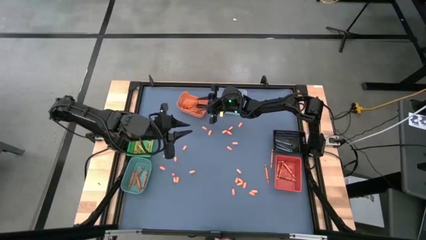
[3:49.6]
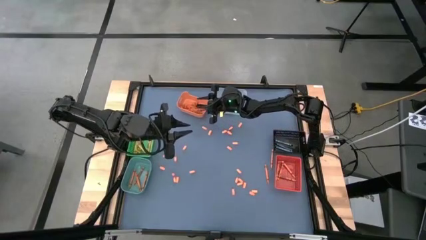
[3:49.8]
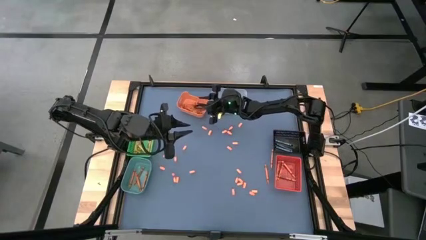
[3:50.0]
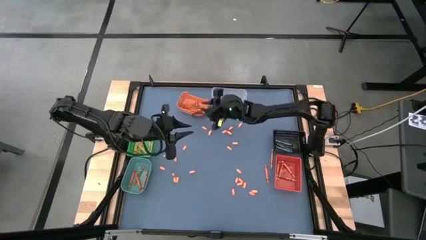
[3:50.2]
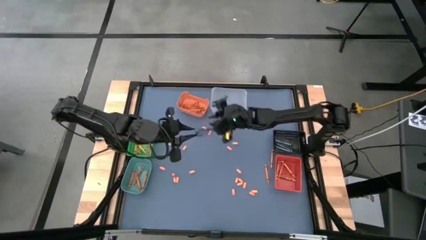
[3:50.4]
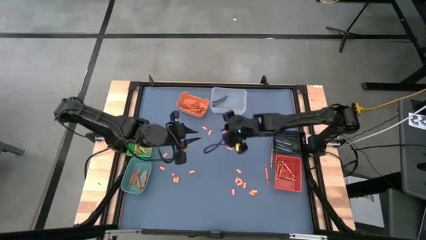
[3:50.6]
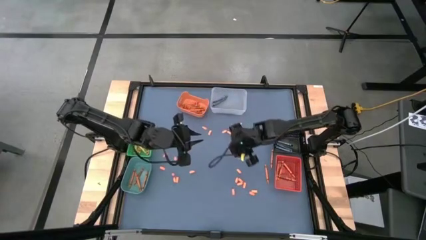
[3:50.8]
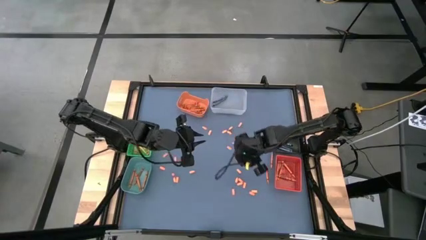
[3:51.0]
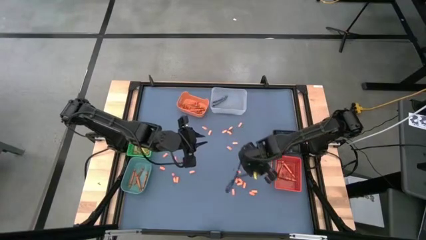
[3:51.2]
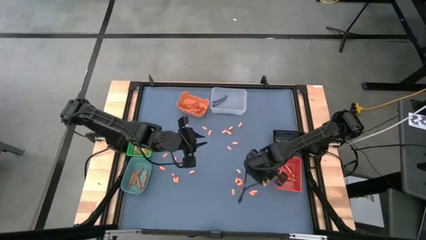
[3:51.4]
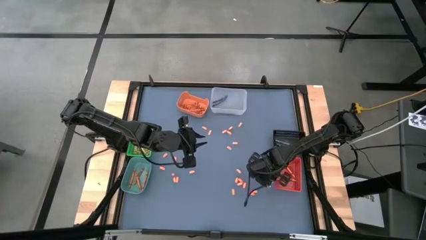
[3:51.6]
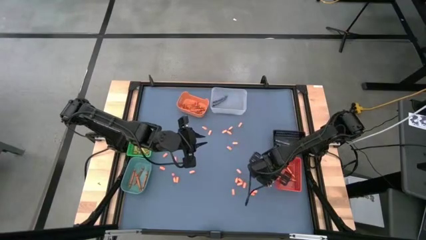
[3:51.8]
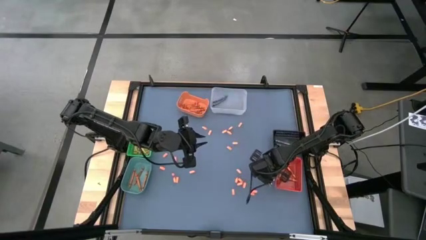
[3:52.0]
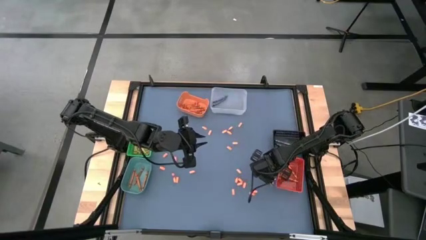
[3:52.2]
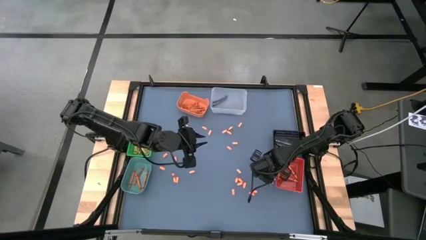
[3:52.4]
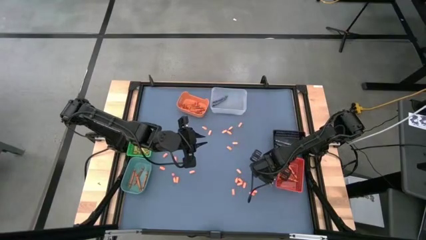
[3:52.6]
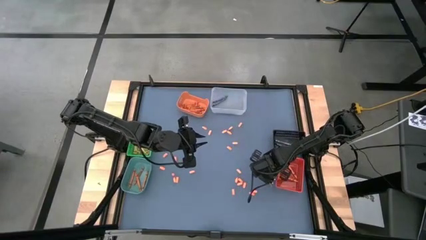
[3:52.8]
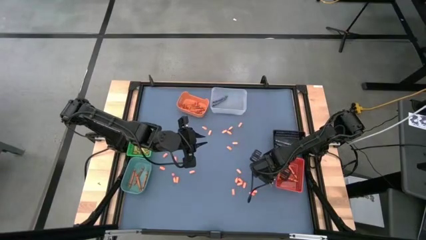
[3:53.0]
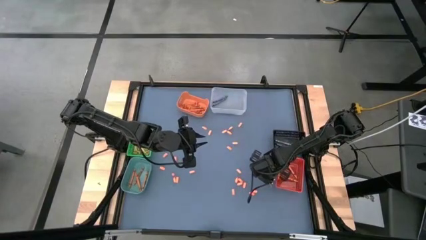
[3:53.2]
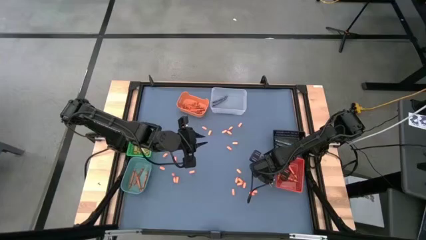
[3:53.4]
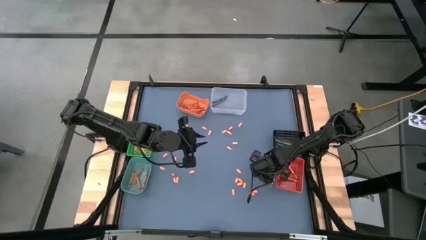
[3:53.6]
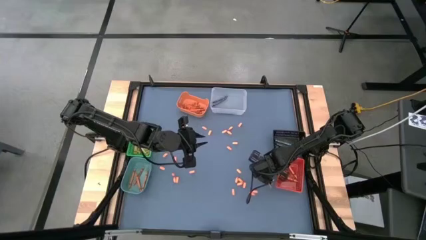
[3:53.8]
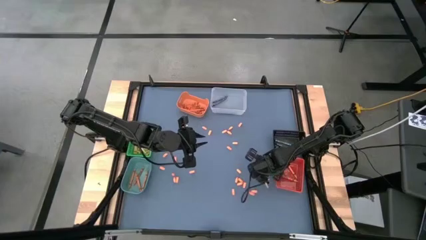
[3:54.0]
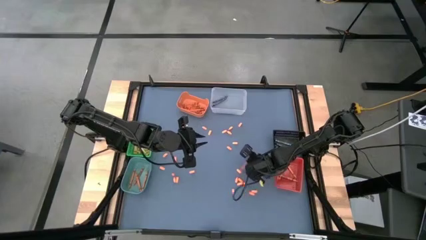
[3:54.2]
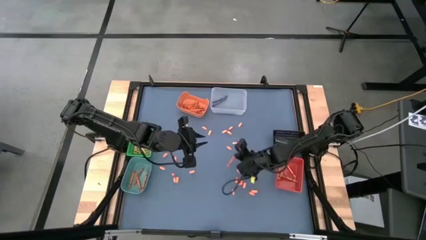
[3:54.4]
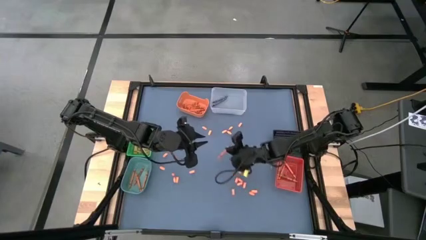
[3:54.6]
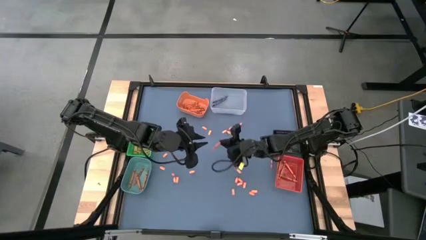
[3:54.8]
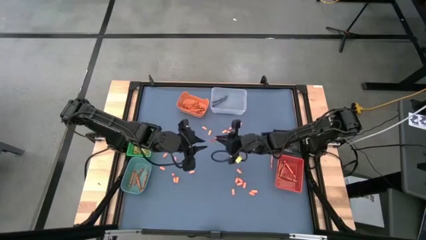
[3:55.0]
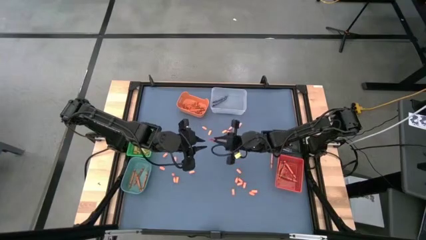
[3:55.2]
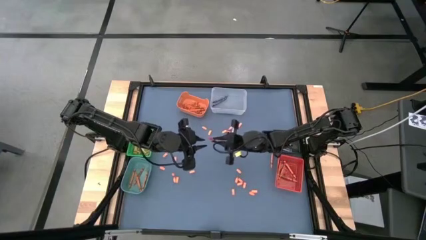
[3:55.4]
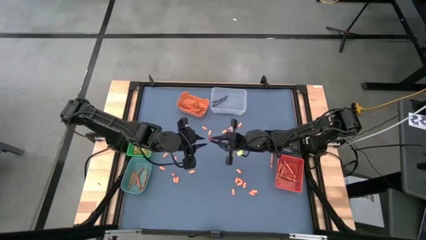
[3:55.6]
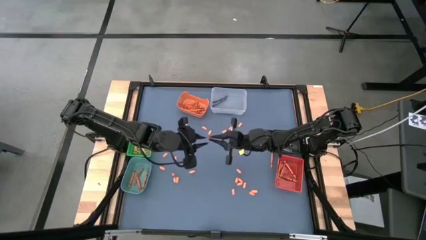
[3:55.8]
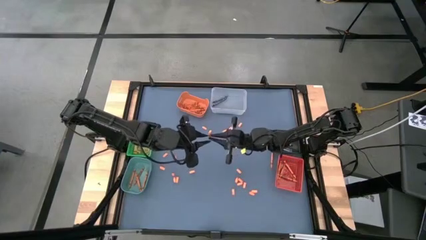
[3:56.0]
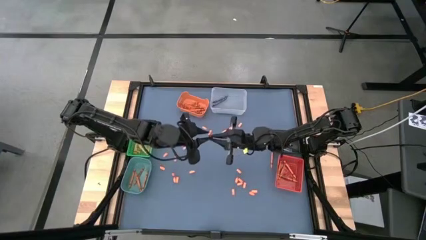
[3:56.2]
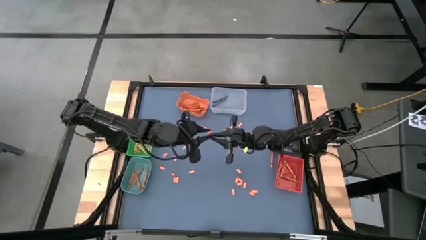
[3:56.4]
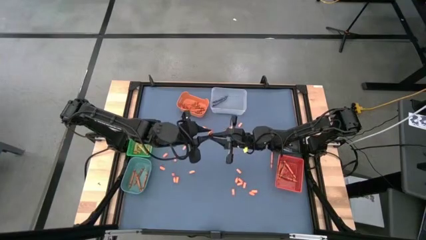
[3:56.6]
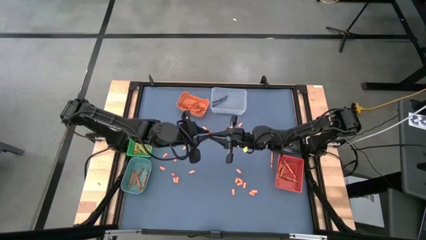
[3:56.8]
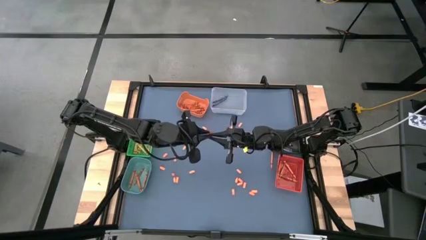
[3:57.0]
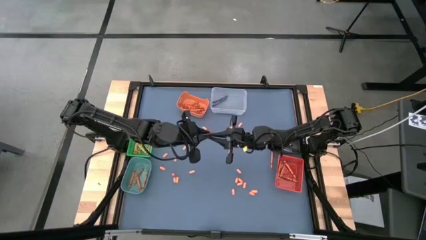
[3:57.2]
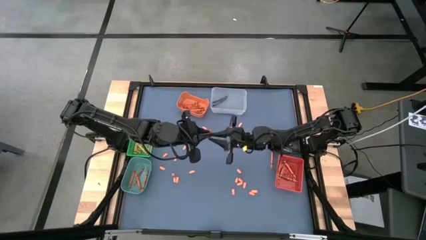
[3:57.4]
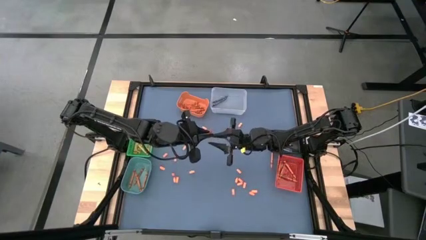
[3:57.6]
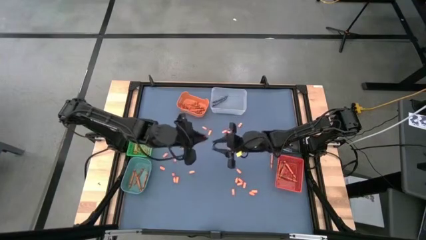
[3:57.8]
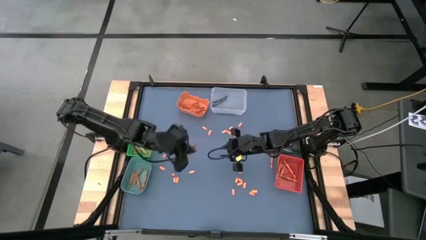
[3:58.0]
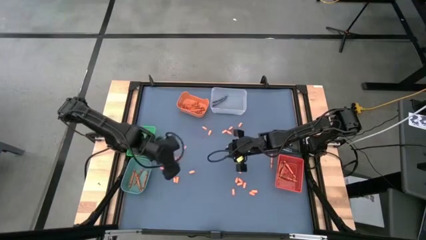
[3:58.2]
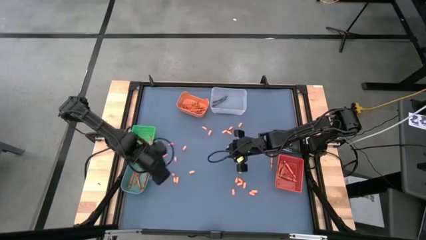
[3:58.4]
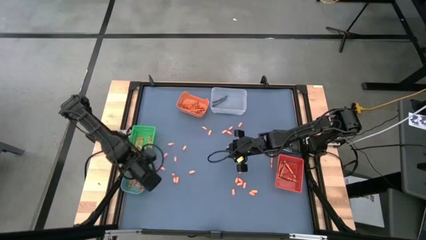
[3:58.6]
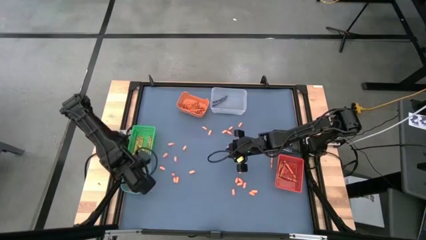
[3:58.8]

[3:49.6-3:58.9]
Task: Sort crayons
Put the orange crayon into the blue bin

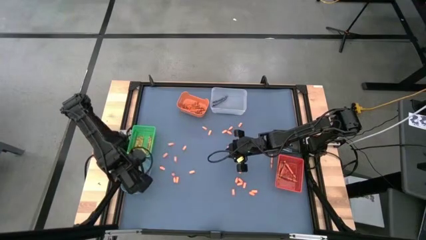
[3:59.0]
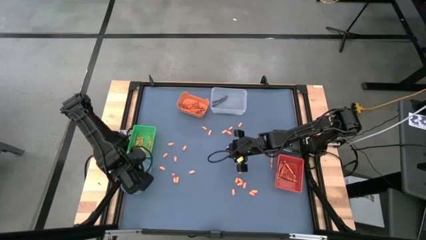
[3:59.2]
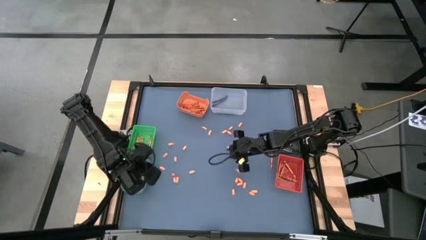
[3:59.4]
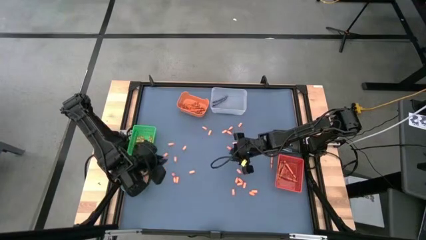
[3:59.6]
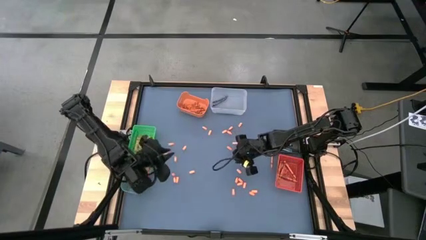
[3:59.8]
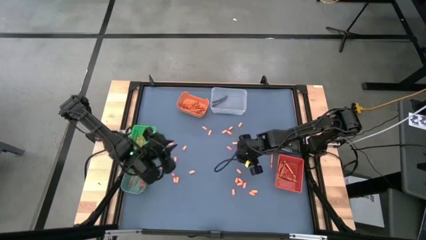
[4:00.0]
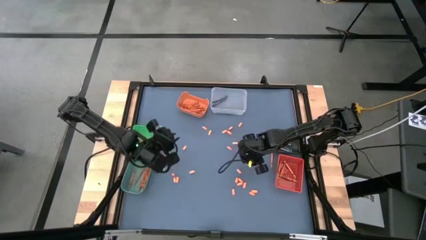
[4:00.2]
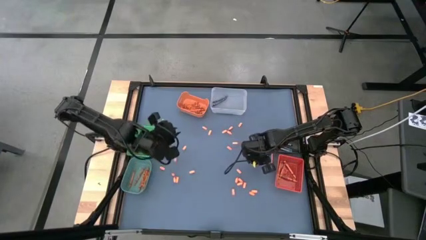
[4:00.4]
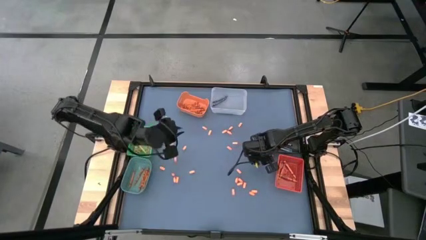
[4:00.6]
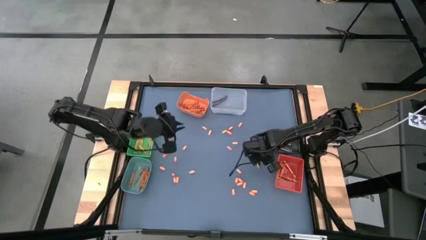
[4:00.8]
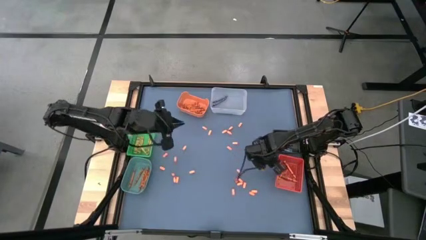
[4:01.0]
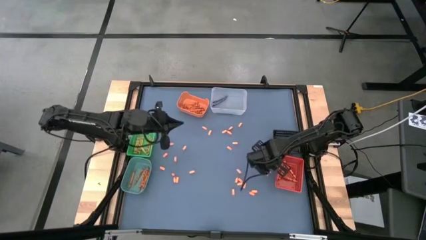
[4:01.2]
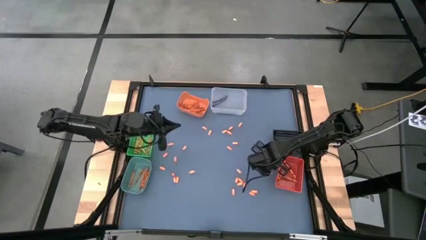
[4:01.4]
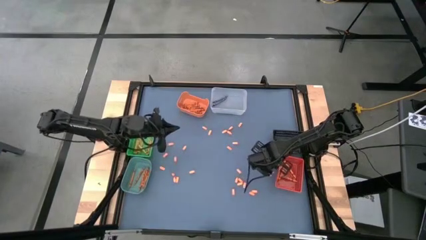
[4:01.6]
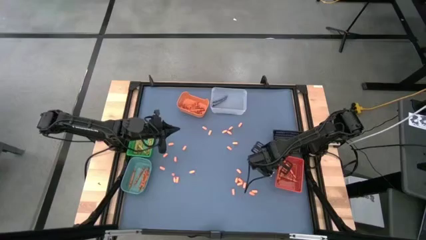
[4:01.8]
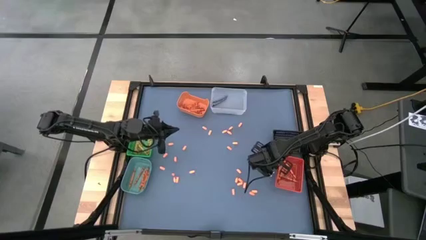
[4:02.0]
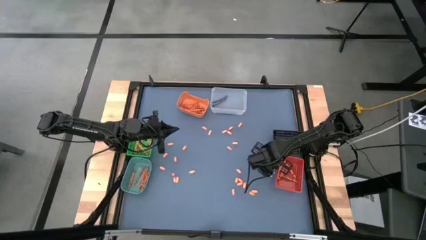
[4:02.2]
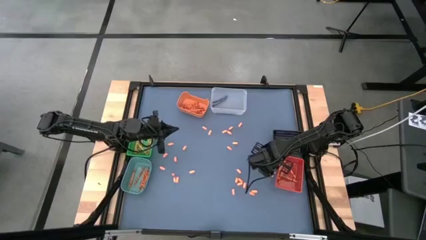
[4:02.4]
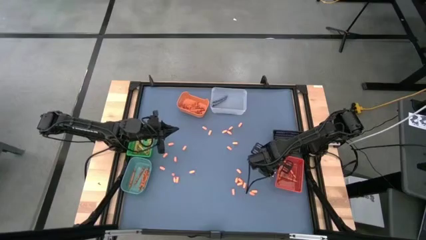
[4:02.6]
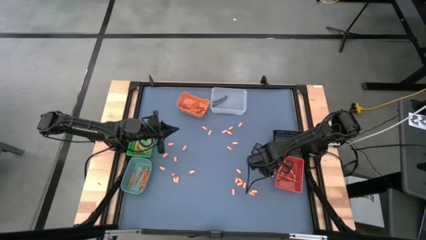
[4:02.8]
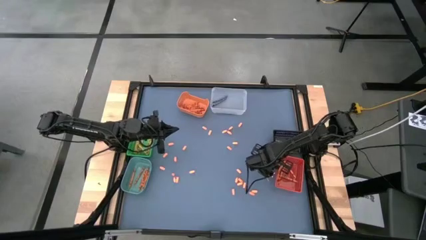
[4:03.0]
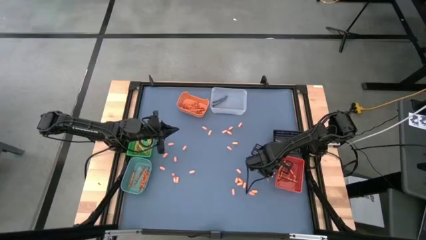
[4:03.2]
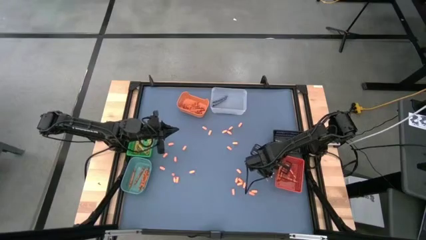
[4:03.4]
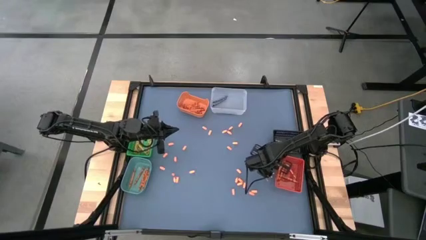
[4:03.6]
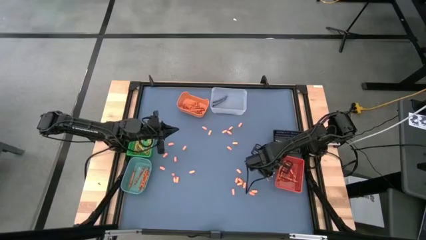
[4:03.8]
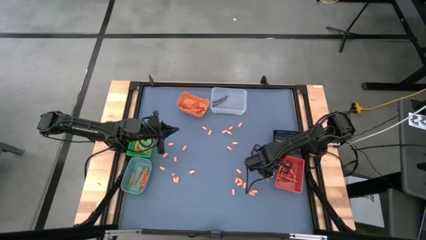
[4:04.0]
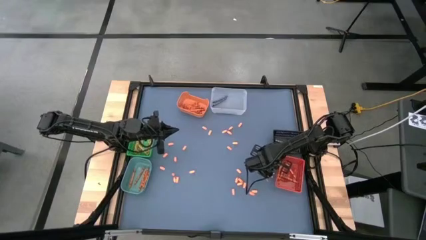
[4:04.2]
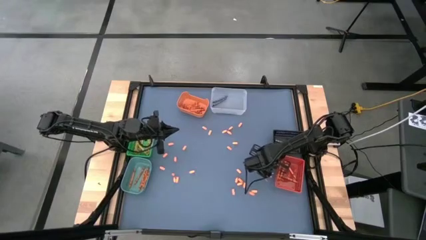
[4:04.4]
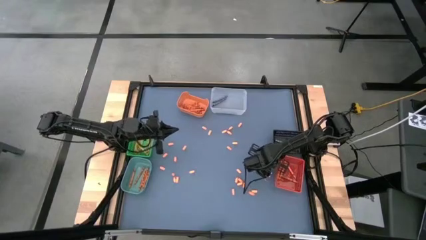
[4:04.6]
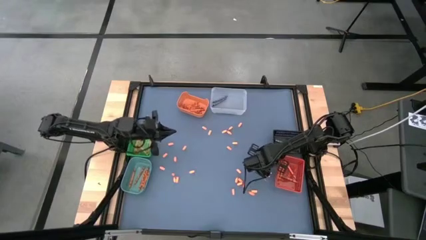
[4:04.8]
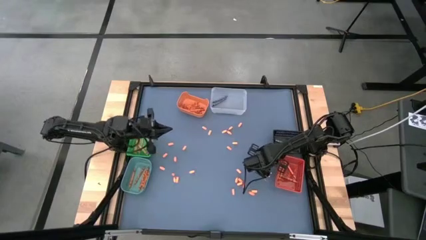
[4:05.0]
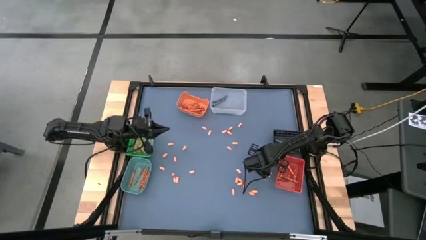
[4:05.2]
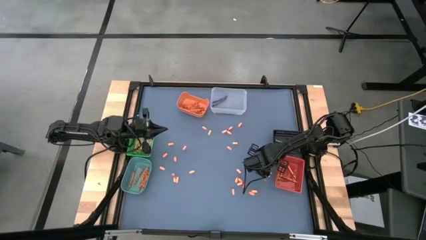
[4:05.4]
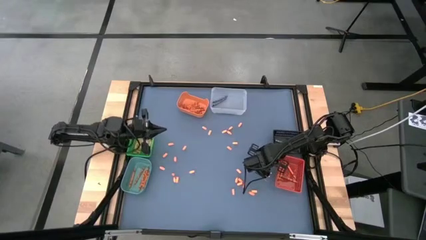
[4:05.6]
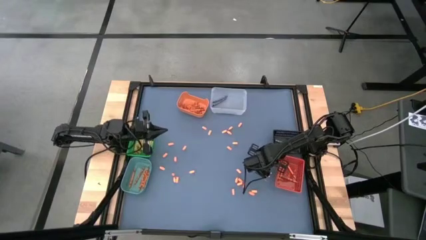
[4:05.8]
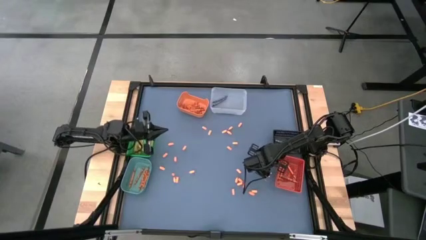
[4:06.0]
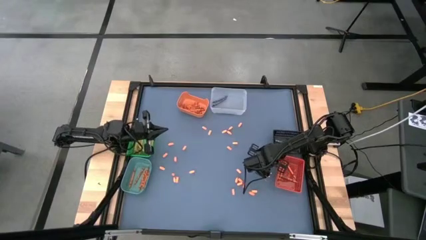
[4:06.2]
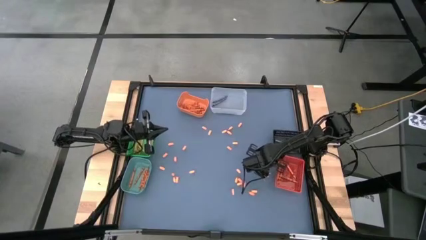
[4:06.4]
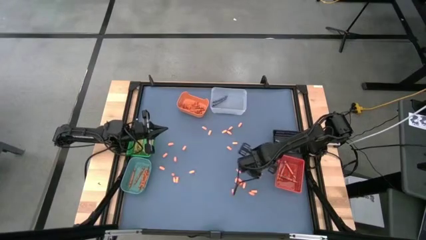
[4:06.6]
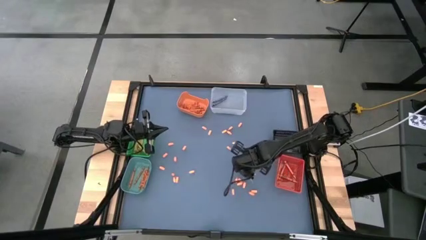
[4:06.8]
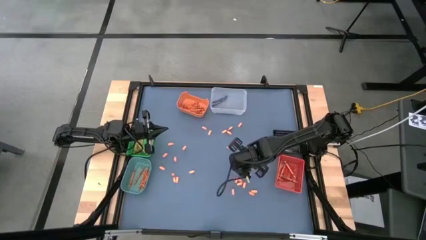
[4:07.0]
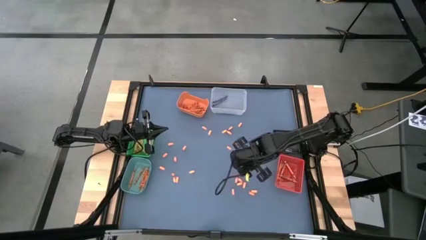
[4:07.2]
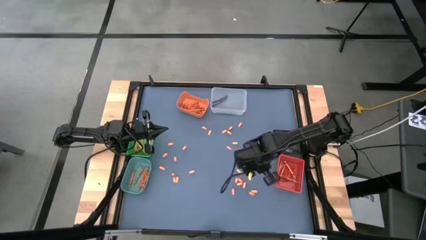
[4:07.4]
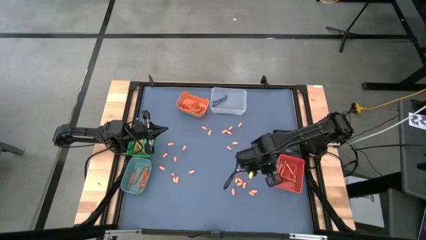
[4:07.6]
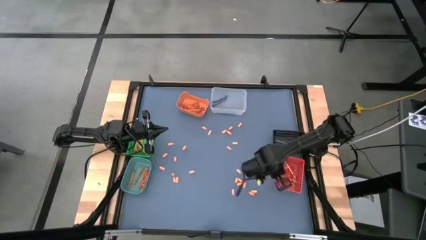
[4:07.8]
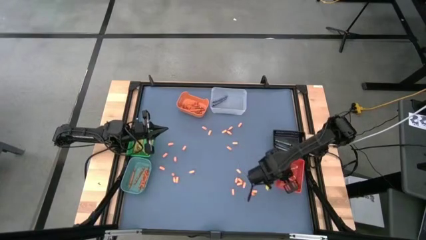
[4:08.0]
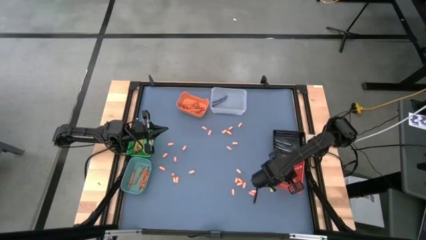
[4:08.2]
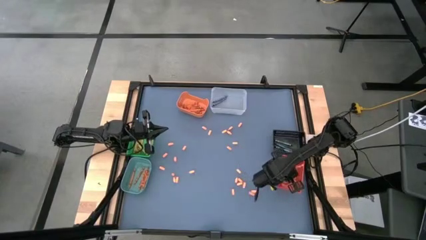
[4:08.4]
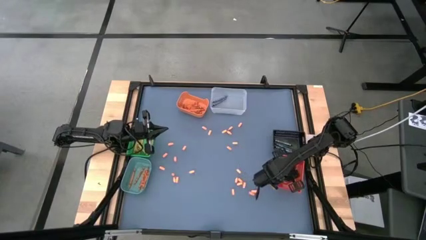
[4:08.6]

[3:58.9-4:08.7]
Put the light orange crayon into the red bin
